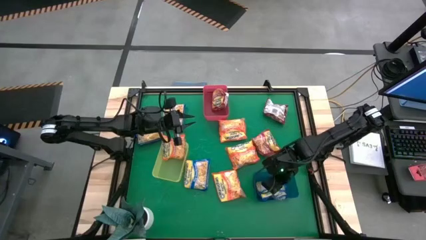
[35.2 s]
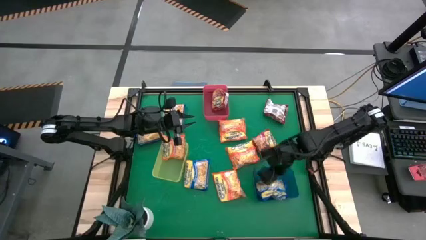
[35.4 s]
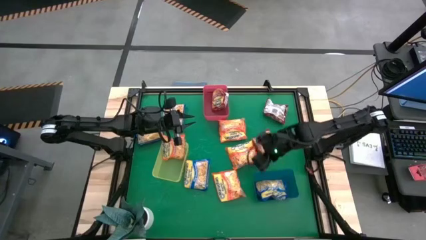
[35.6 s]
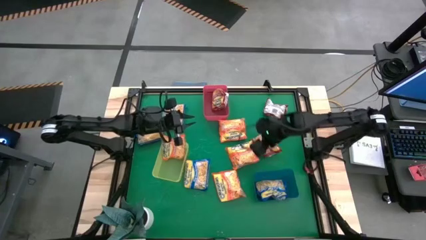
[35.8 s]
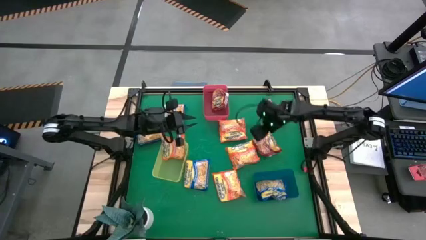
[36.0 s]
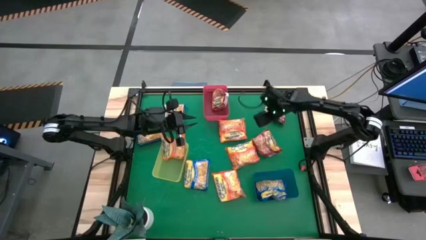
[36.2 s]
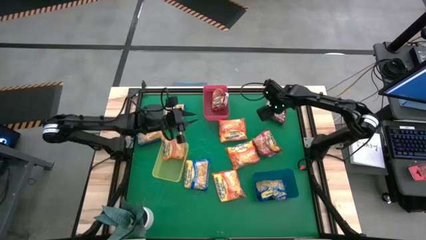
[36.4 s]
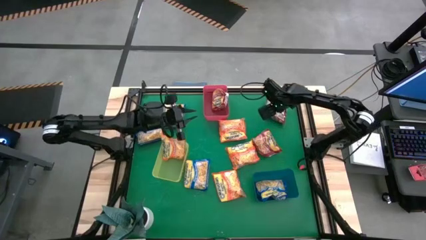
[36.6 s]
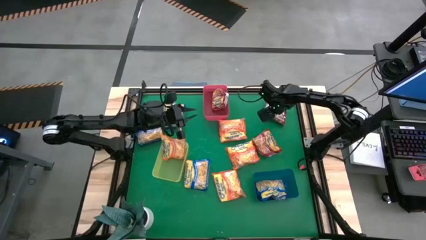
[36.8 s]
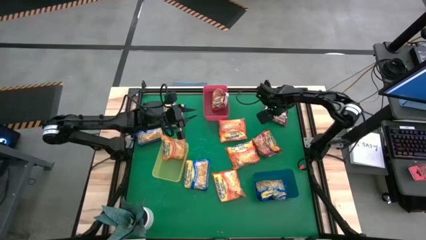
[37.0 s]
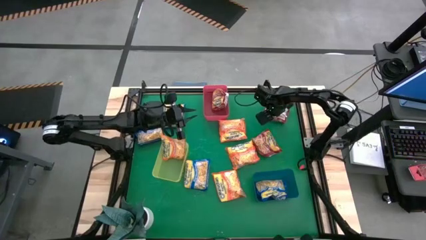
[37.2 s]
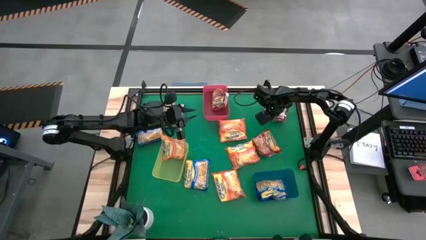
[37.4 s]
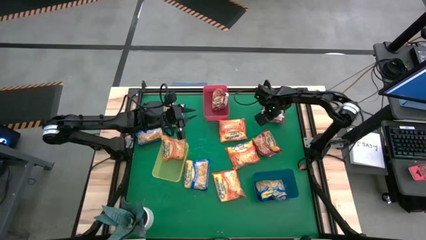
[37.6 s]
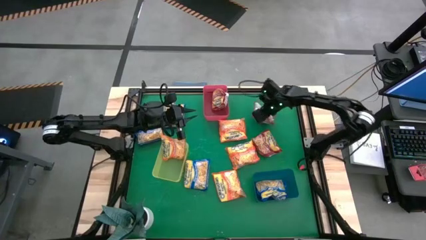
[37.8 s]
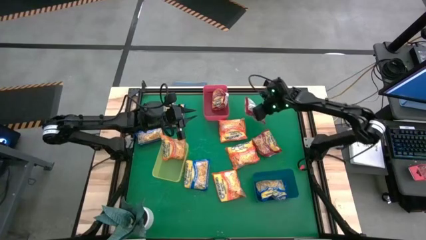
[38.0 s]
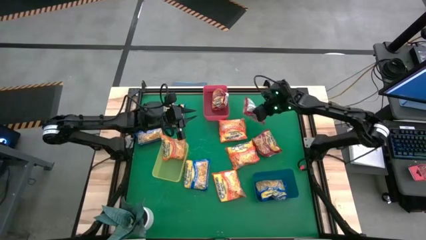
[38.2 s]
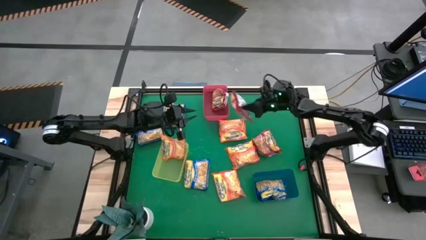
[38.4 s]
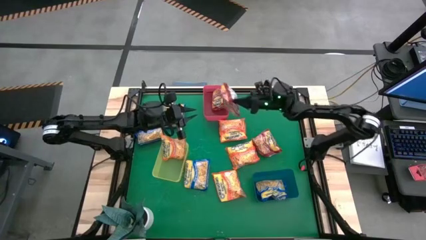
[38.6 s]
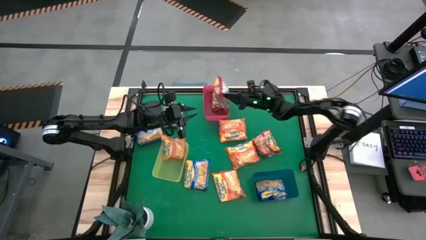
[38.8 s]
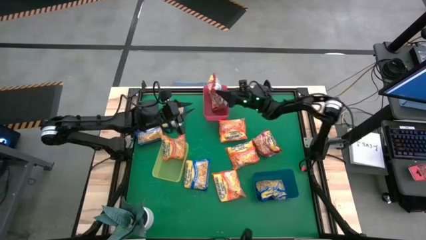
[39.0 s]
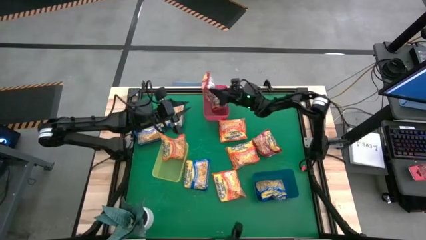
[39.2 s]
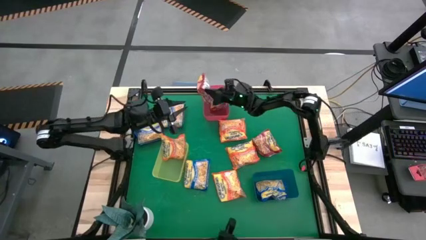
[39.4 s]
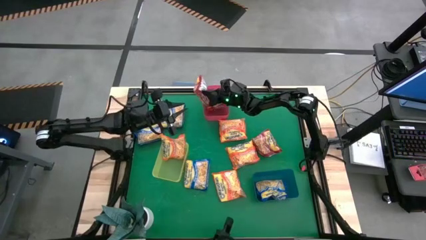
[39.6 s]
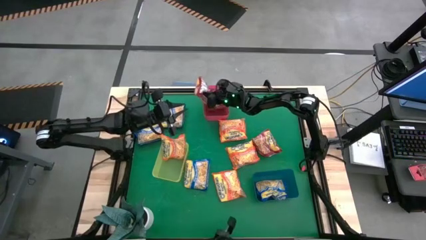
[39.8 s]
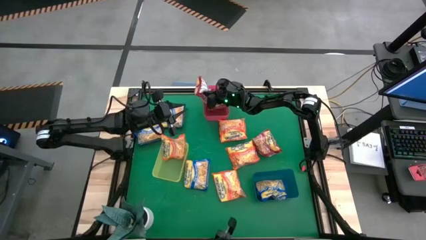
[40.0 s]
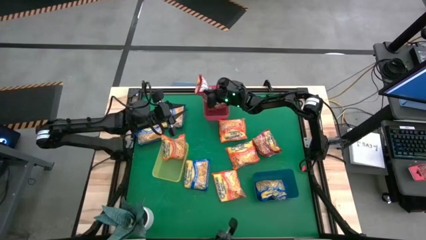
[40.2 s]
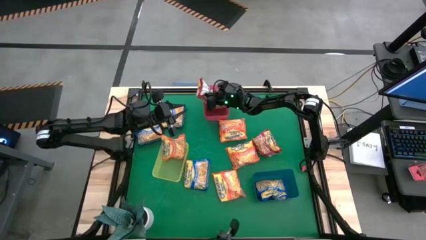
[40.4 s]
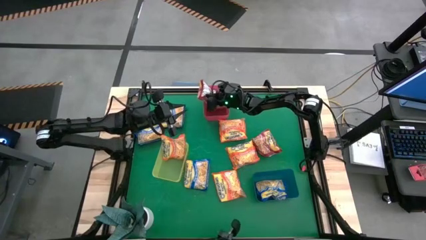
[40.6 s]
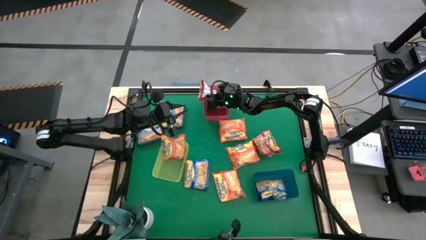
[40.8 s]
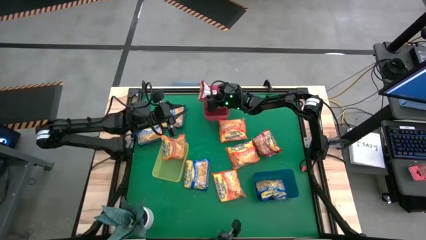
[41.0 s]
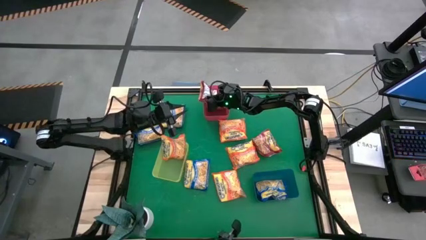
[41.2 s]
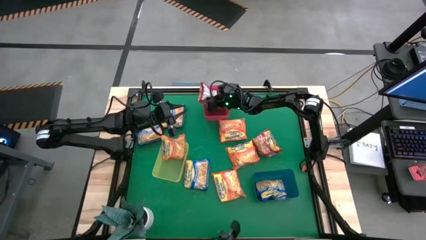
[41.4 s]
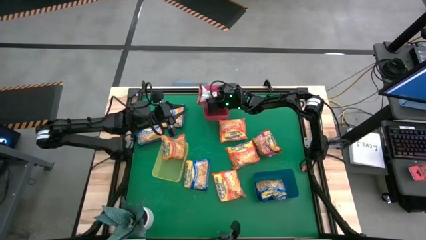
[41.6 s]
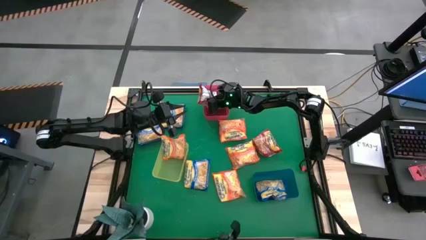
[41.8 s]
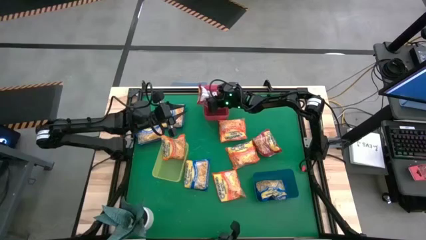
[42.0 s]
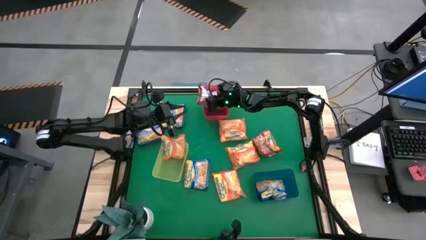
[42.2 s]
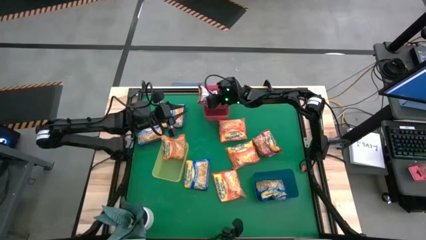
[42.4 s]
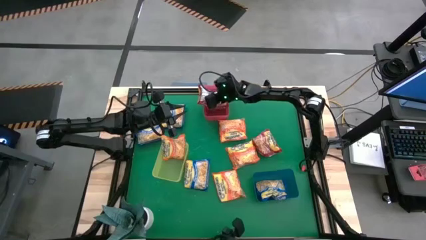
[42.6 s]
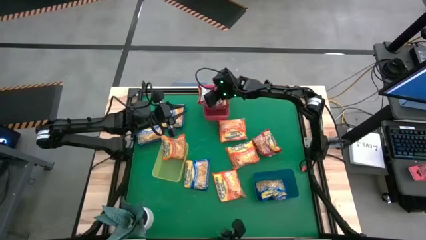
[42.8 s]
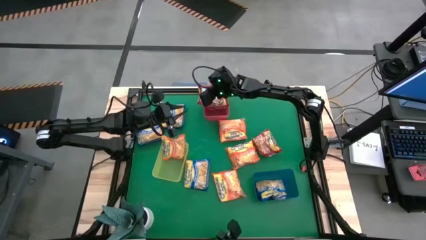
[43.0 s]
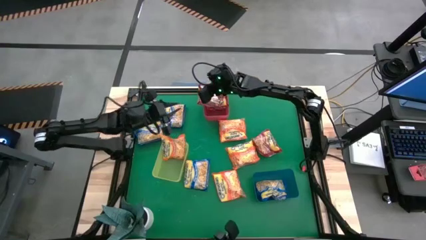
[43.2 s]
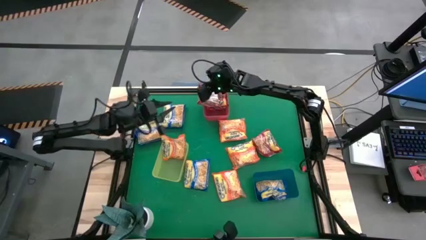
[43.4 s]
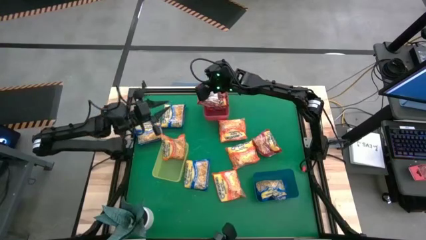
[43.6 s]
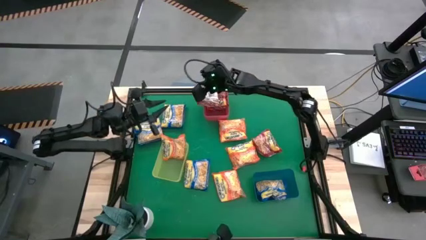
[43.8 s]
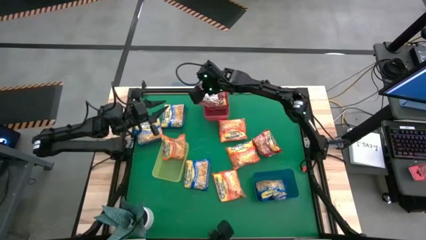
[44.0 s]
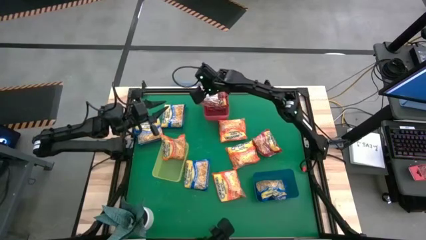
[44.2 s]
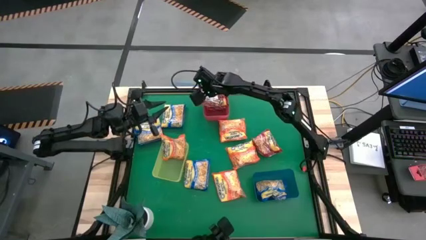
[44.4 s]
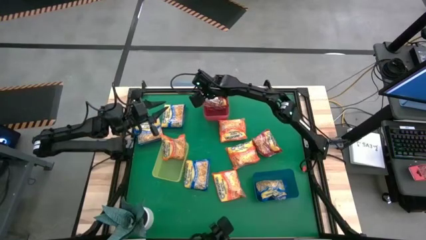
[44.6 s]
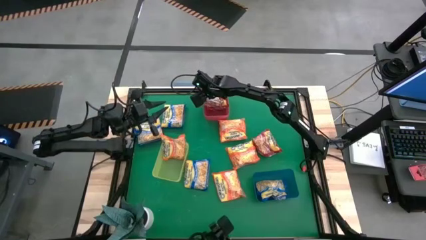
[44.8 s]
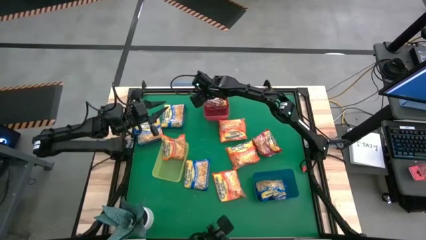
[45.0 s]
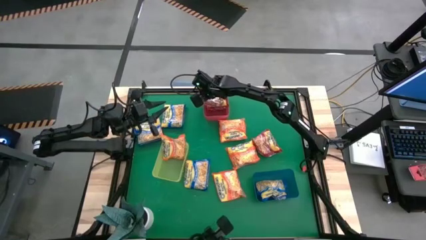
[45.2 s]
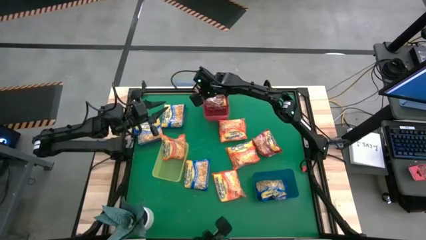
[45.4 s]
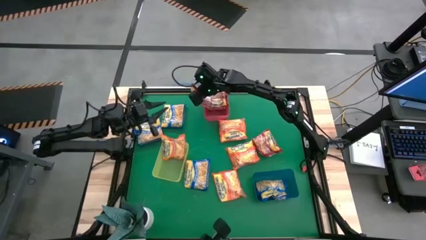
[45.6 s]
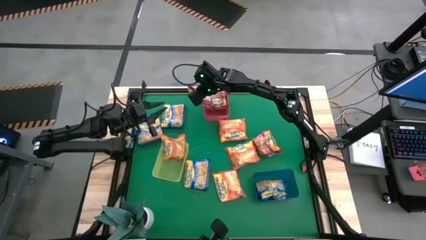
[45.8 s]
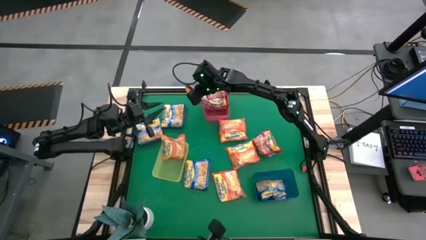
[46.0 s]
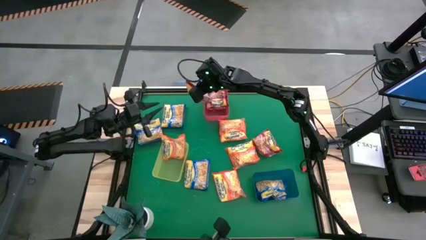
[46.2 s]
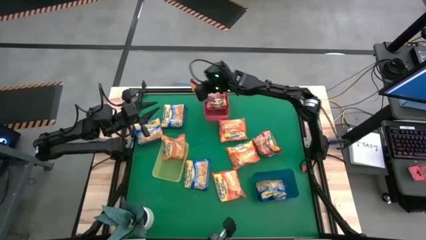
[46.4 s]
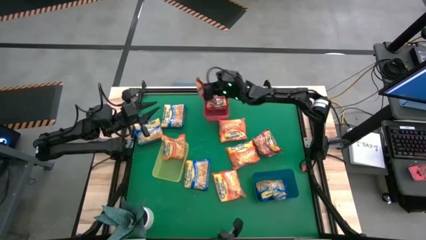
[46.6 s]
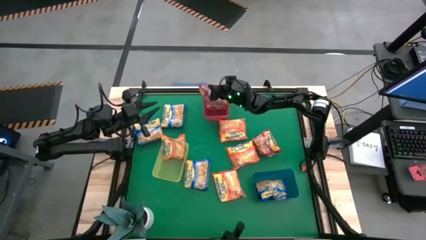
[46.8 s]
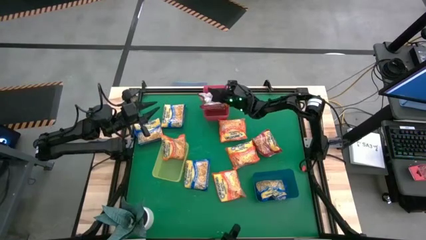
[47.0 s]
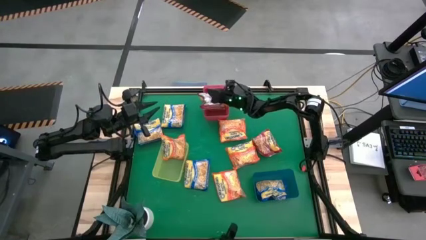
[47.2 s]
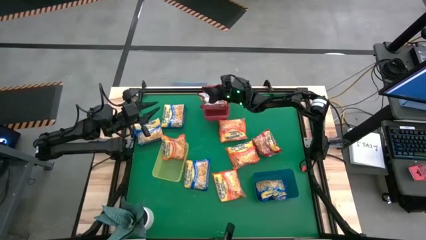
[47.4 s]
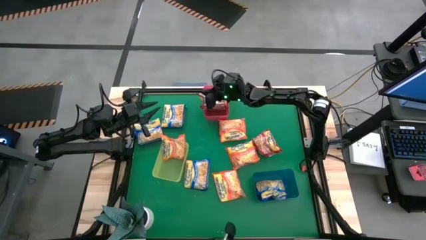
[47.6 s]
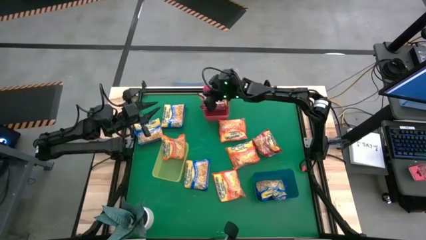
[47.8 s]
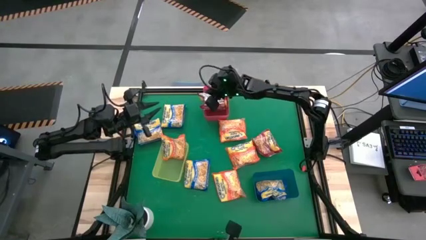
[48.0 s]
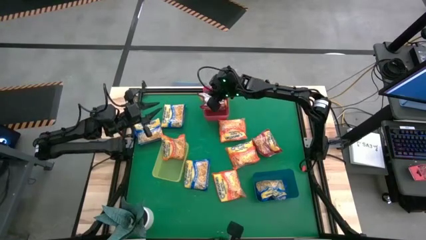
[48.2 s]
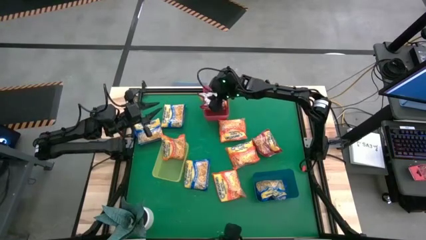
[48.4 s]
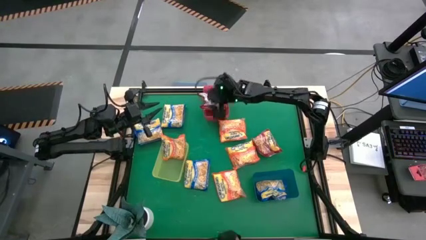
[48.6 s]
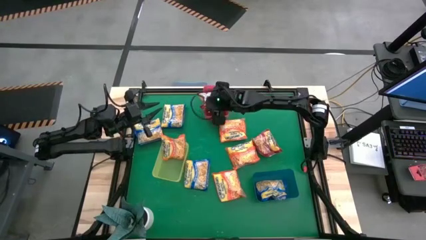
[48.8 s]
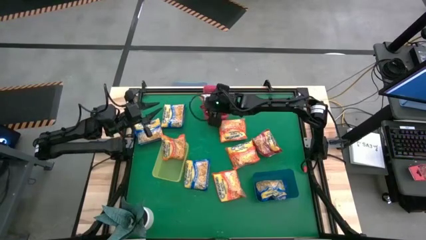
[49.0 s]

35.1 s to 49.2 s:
Task: Sort Maruchan noodles
Put the noodle pack into the red bin

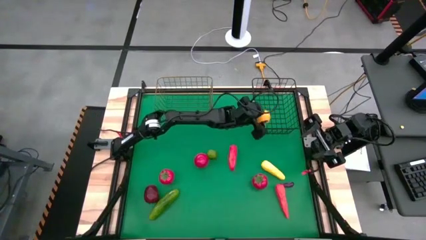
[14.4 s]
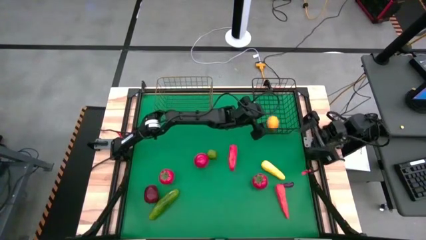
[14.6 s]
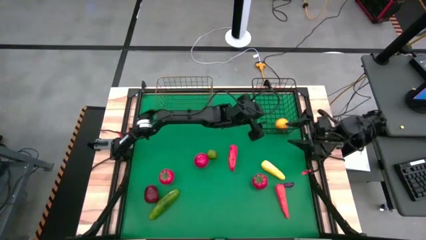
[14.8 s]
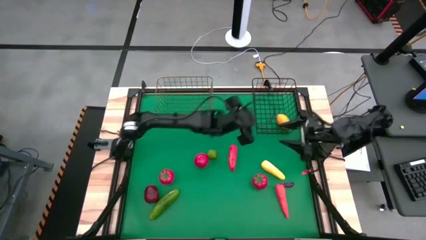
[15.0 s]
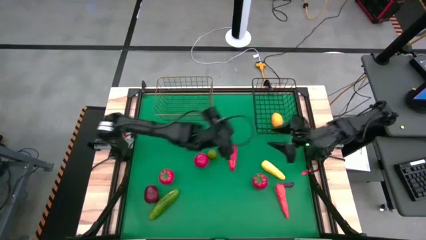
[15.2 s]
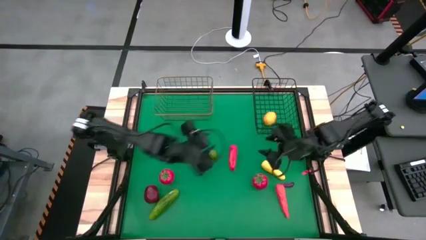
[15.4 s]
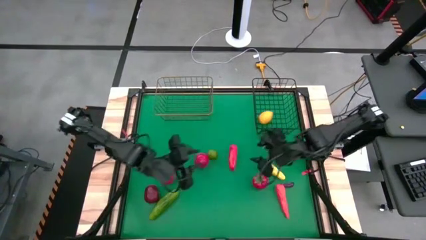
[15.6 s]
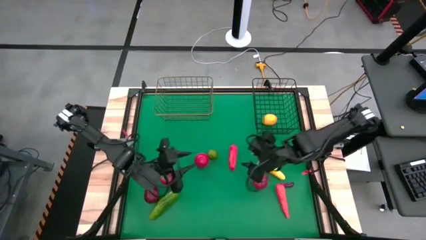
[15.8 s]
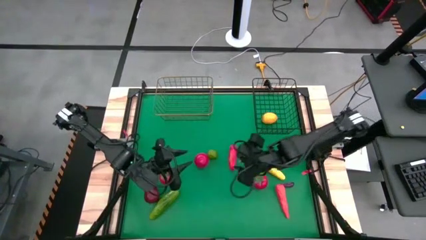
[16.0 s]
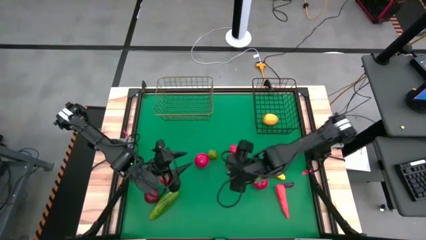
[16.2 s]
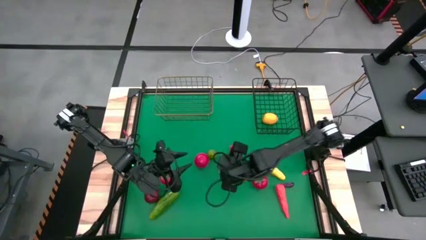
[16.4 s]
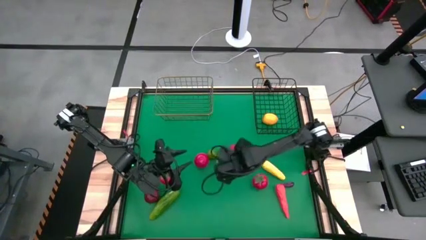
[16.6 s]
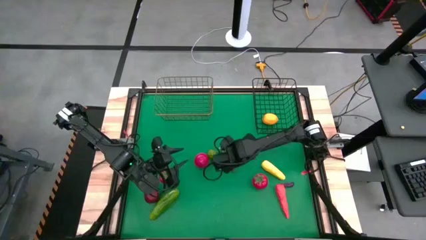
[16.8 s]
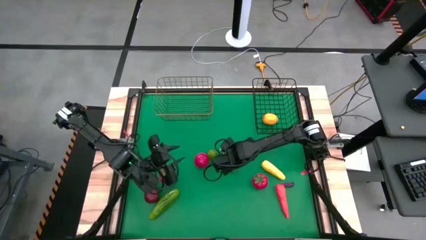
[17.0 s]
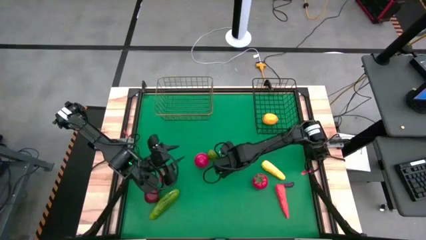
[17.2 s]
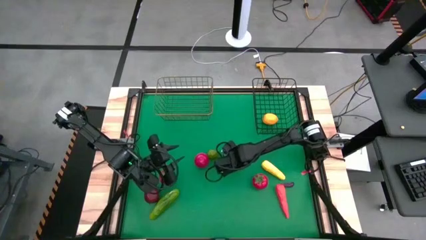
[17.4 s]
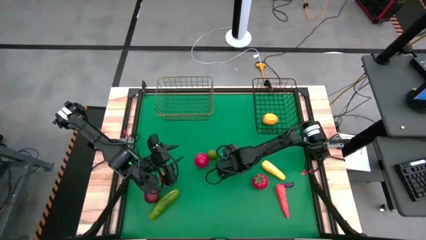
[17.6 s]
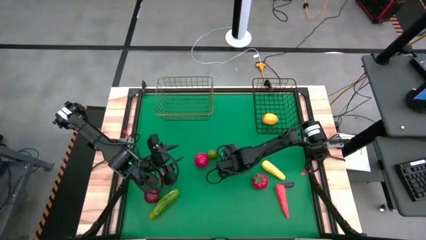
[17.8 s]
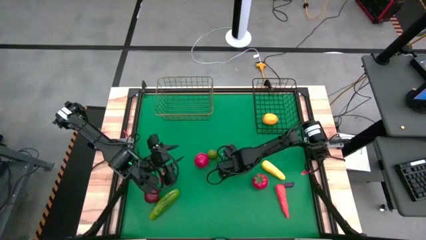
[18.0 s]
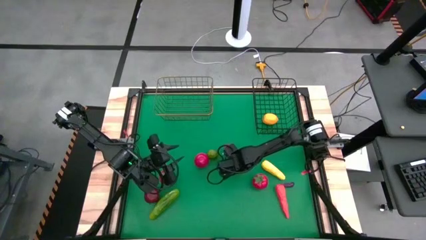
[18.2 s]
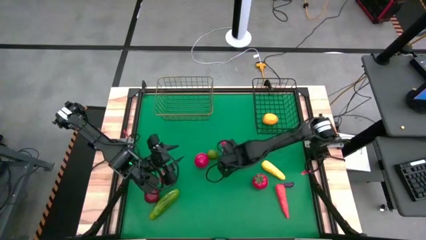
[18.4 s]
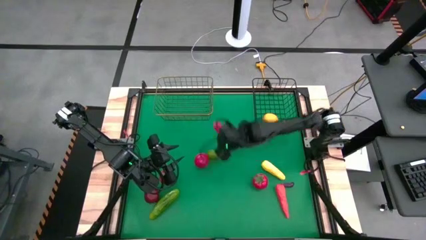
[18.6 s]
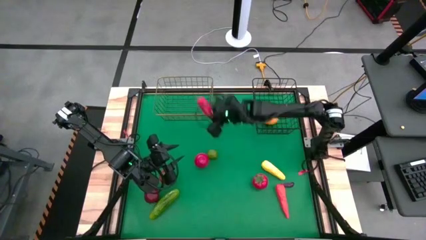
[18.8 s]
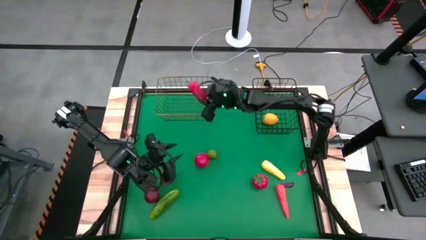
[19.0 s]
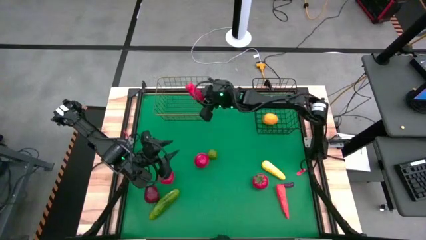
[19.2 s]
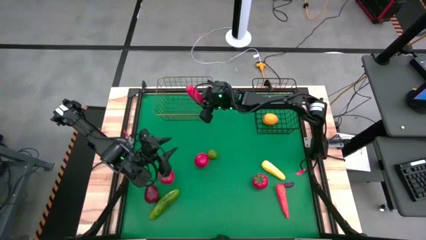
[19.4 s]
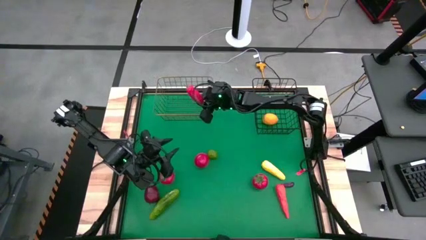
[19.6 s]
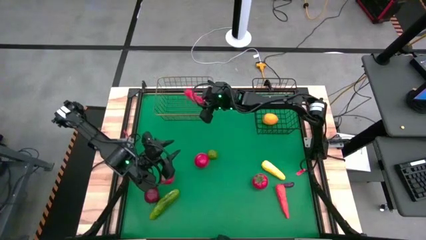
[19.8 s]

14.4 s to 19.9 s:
Task: Sort produce into baskets
Put the top red chili pepper into the gold wire basket
